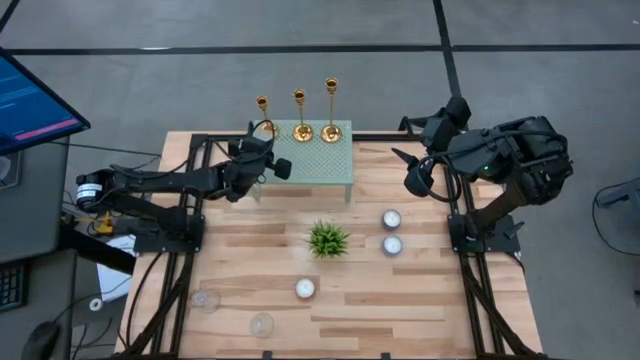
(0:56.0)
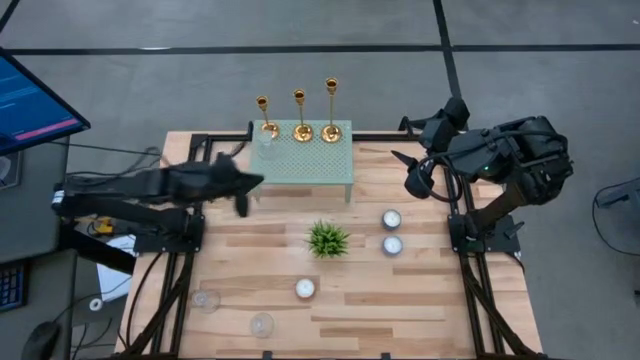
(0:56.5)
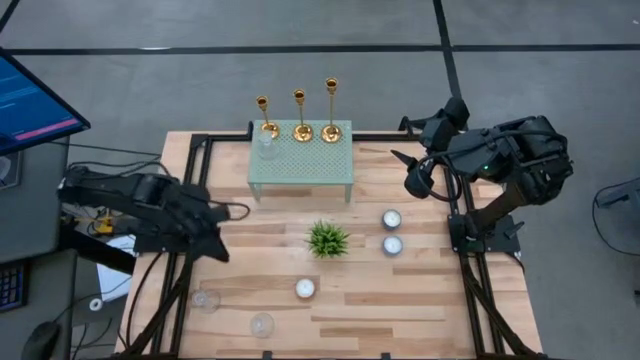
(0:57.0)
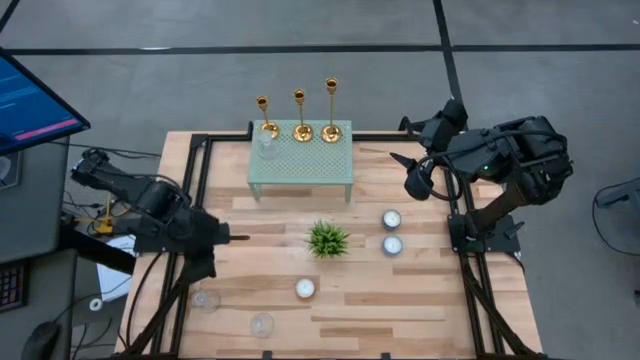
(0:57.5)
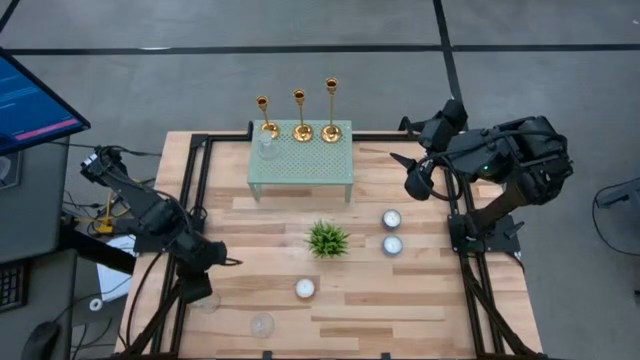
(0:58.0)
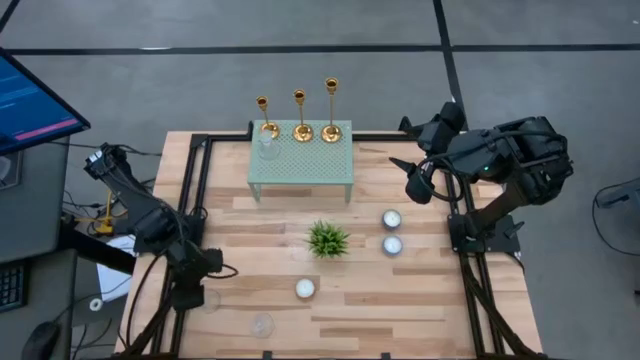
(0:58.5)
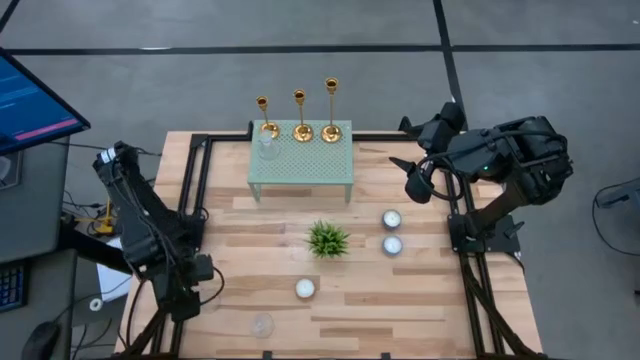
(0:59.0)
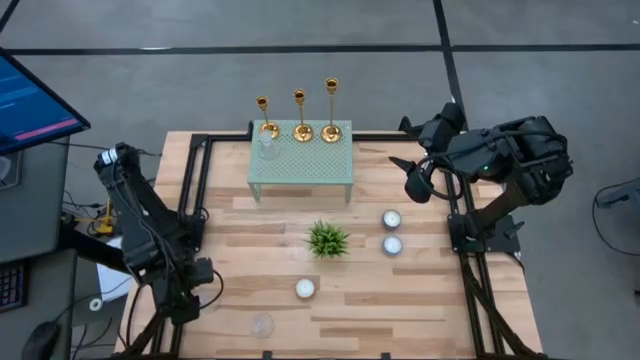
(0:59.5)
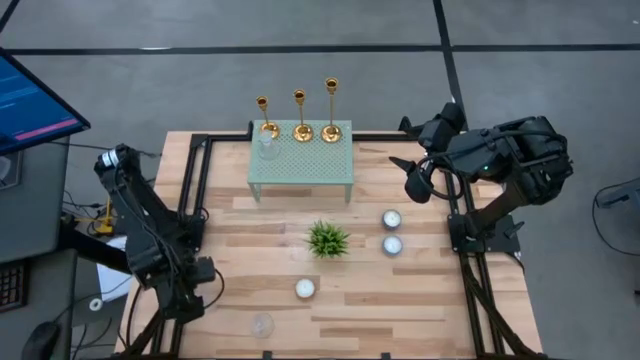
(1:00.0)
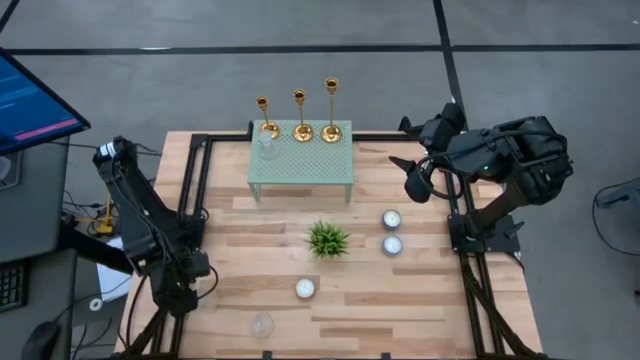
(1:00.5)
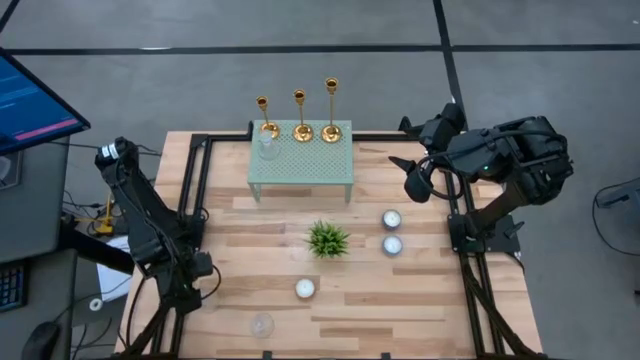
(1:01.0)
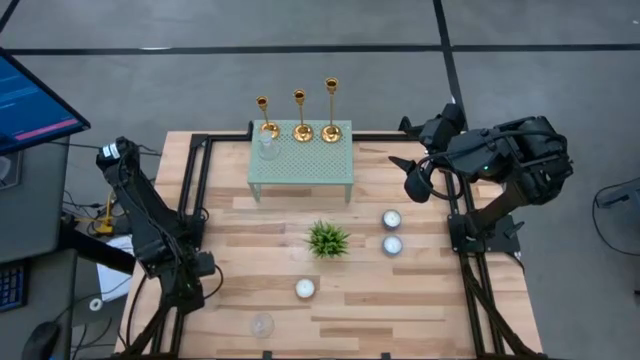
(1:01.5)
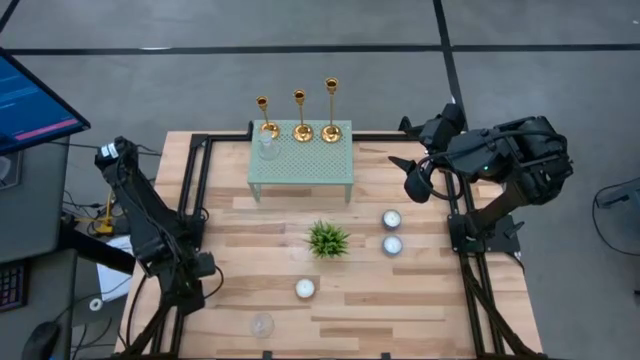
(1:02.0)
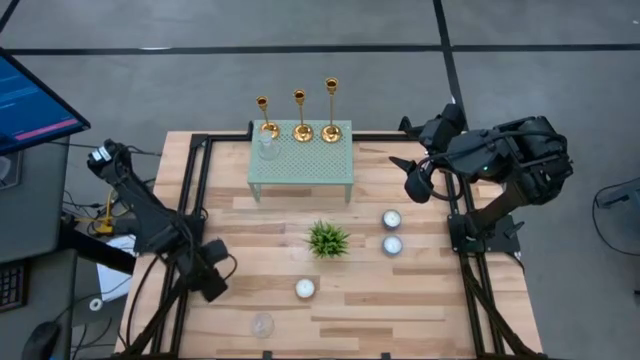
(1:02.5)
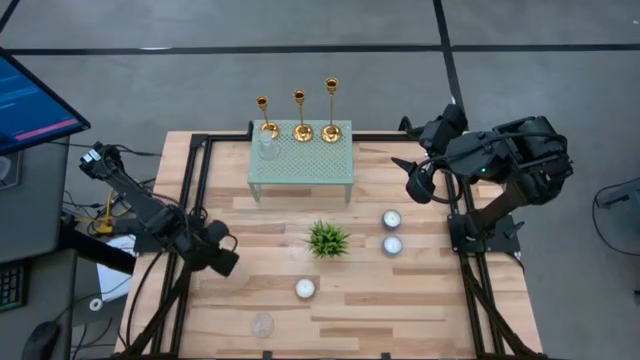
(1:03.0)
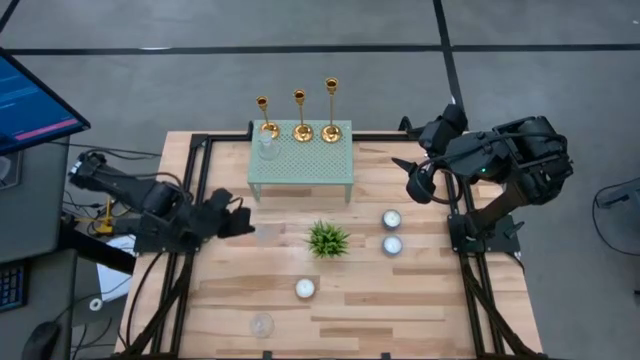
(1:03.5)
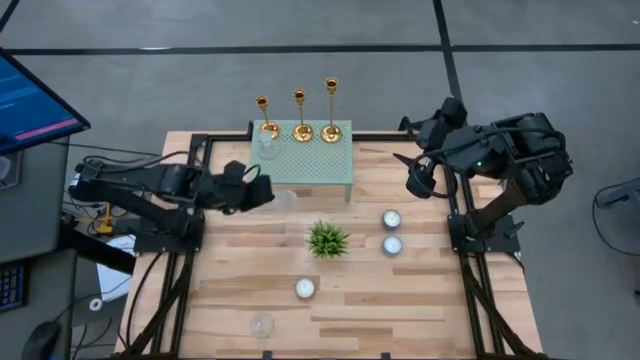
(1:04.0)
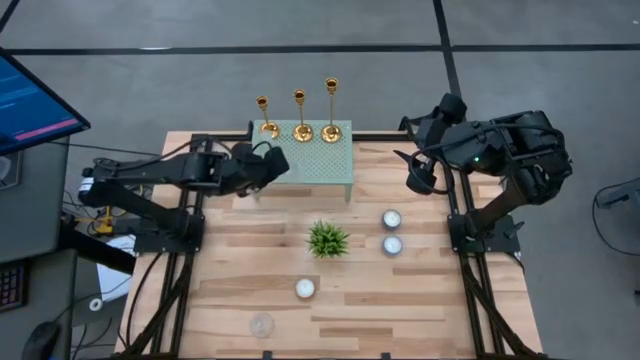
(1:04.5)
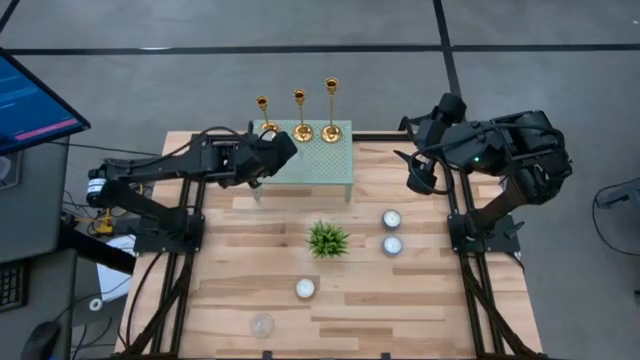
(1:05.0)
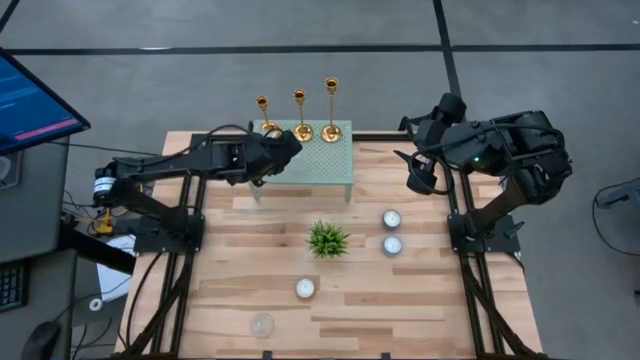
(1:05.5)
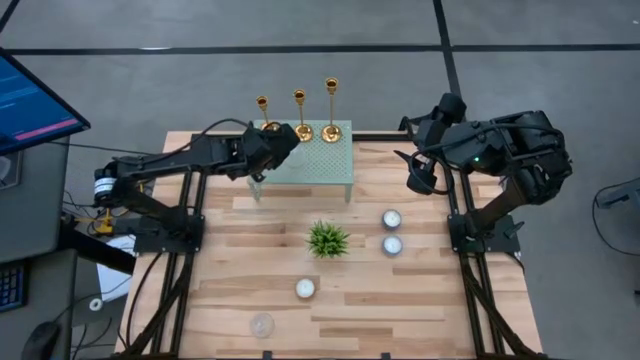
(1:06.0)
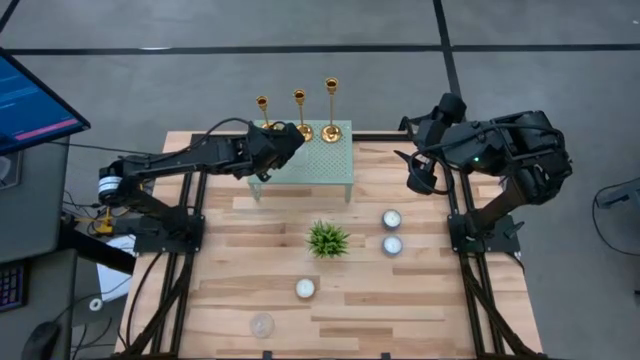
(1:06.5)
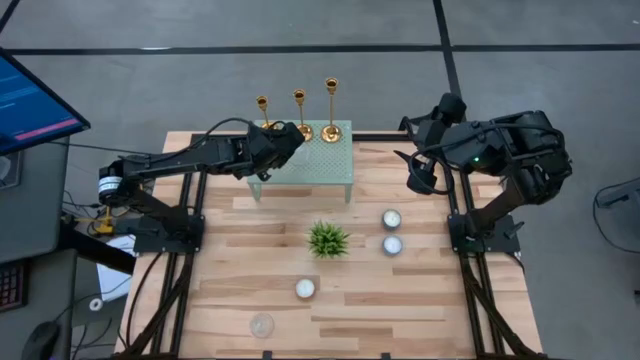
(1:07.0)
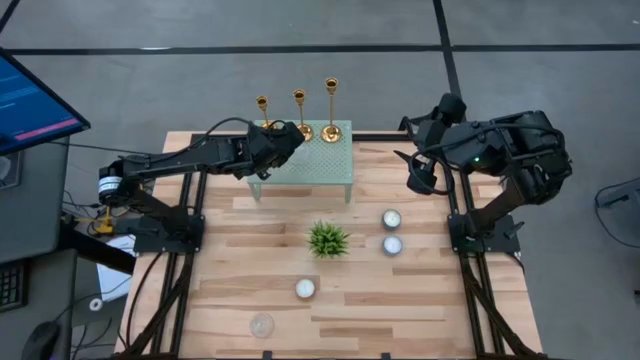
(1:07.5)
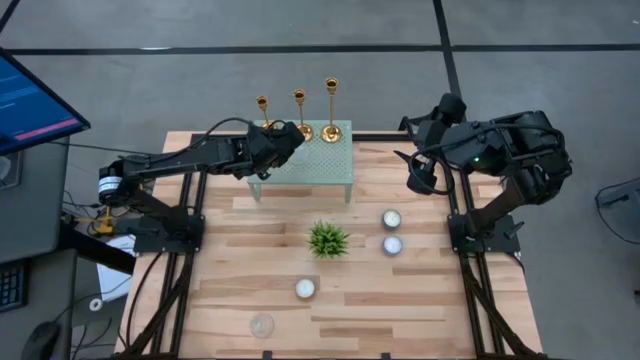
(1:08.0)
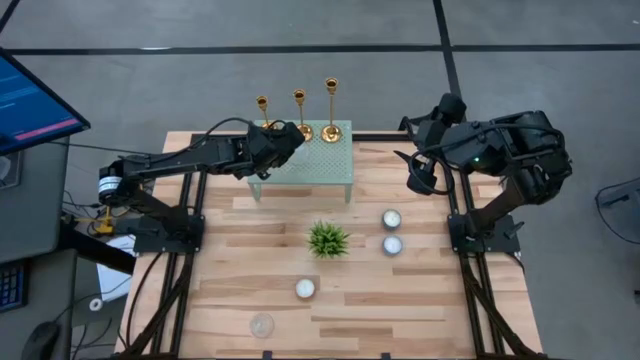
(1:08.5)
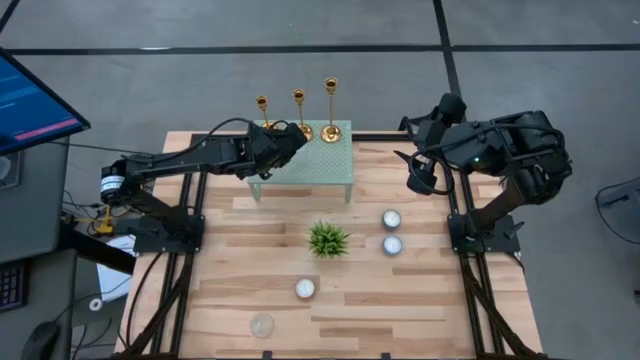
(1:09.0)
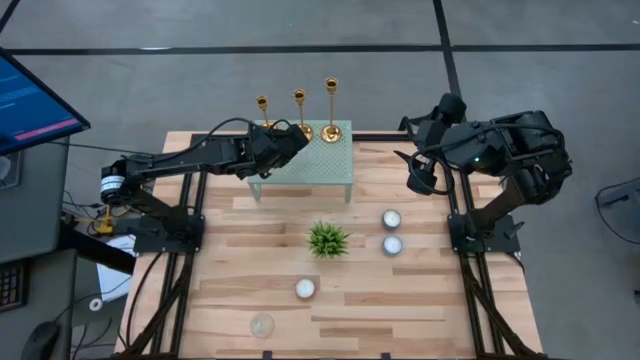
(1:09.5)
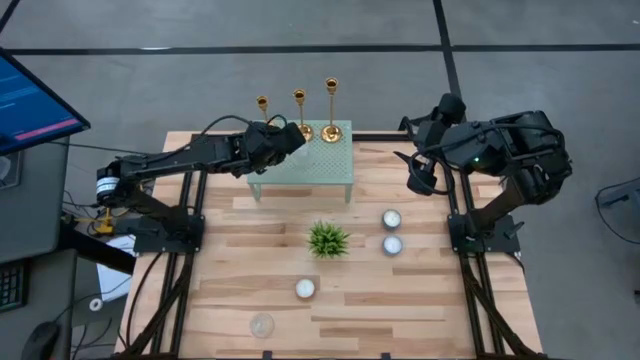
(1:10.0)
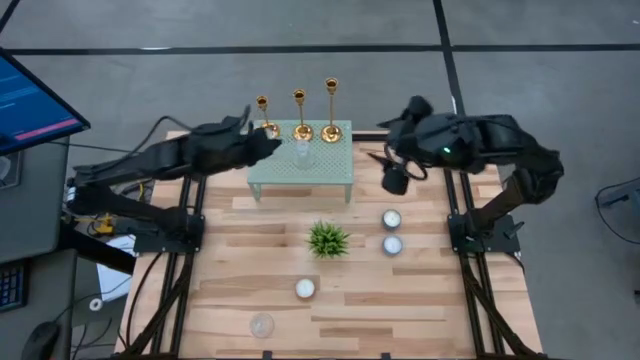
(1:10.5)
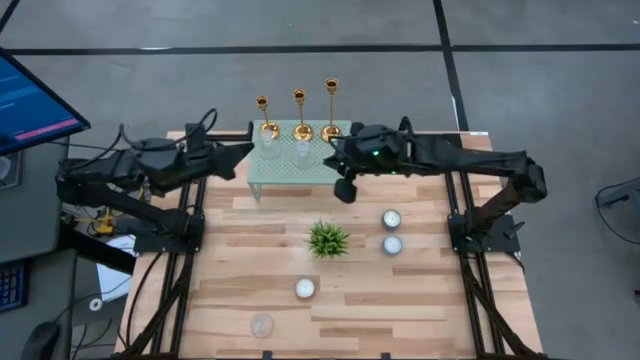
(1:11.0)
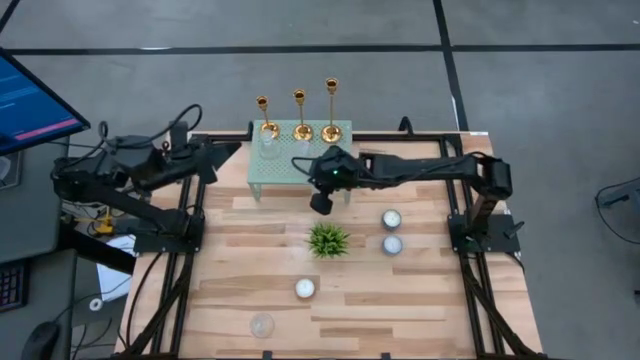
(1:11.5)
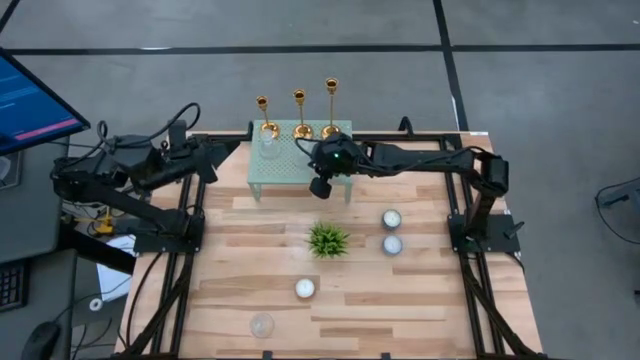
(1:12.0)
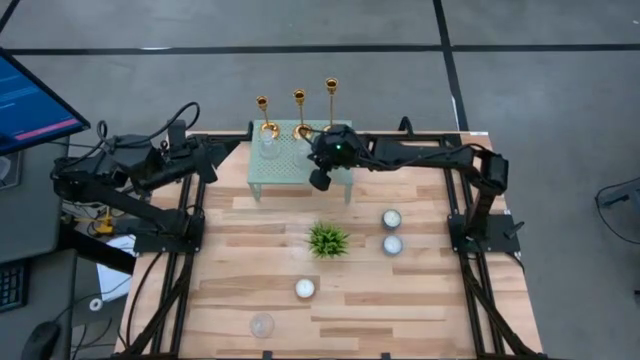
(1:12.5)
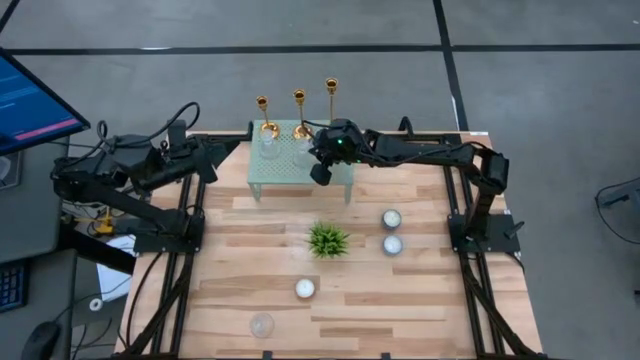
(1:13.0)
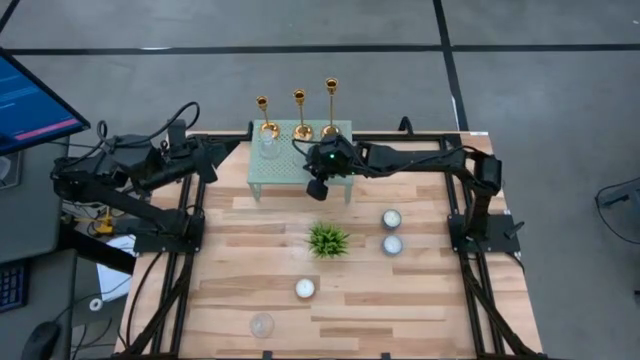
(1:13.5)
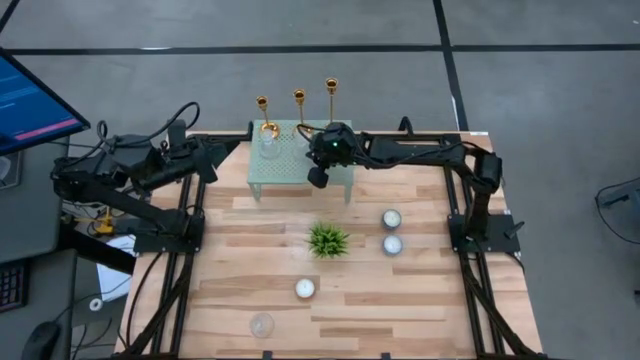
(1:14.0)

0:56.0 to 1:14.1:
Task: Pick & Place candle stick holders
Put the left glass candle holder on the shelf aligned with the other glass candle holder
